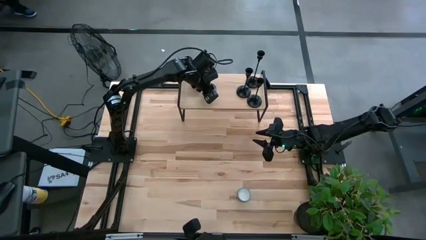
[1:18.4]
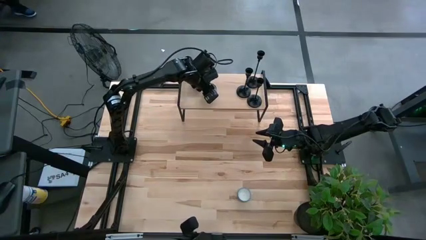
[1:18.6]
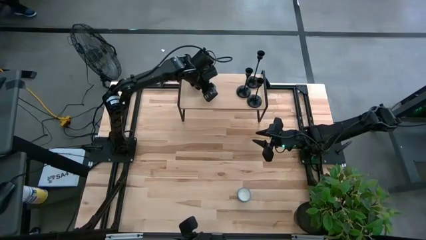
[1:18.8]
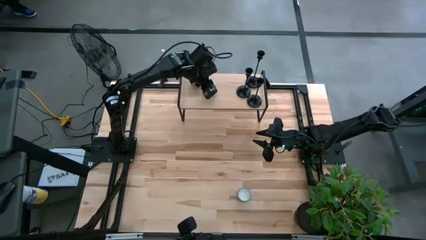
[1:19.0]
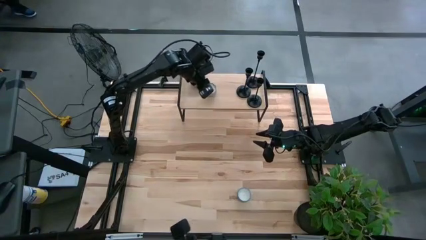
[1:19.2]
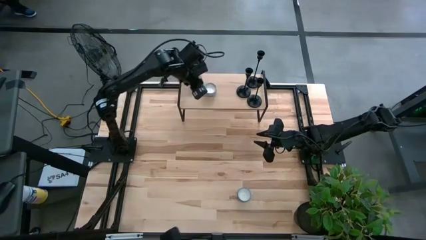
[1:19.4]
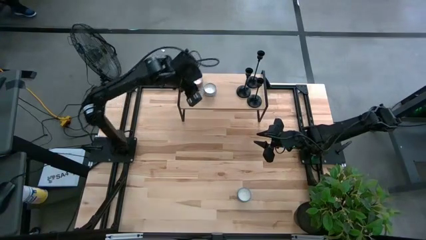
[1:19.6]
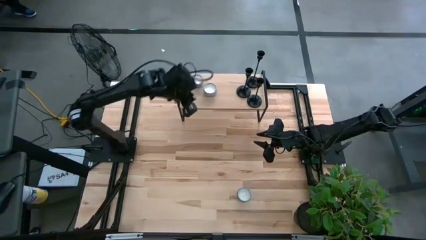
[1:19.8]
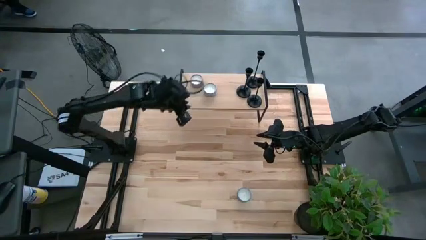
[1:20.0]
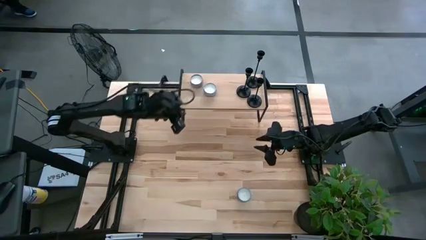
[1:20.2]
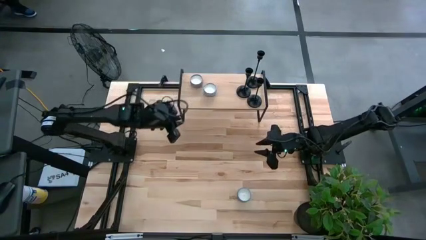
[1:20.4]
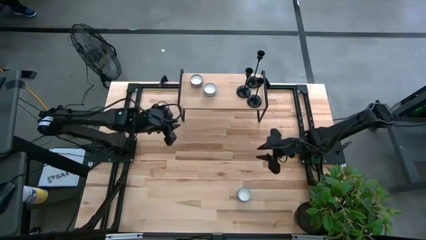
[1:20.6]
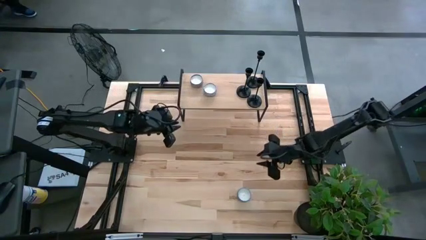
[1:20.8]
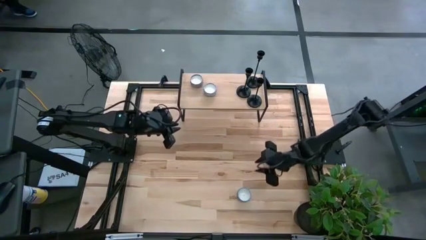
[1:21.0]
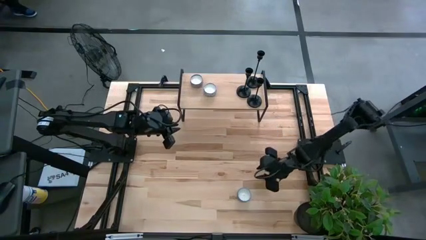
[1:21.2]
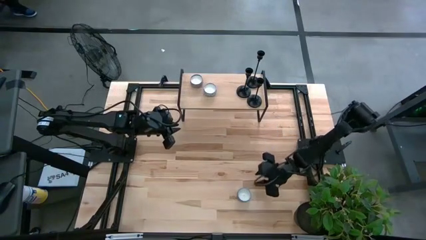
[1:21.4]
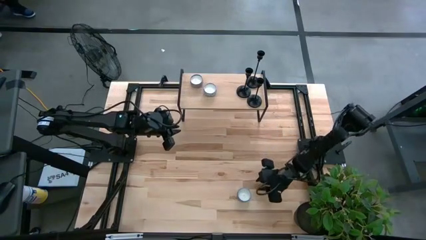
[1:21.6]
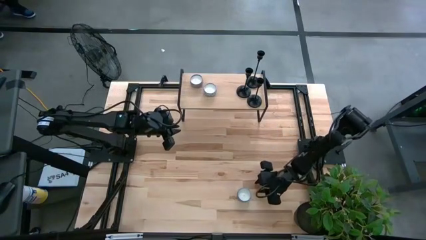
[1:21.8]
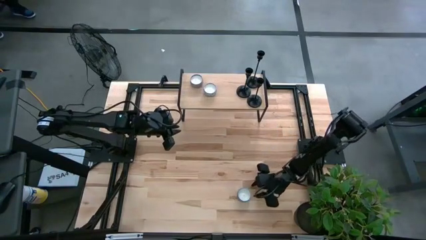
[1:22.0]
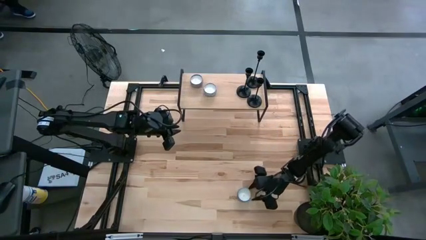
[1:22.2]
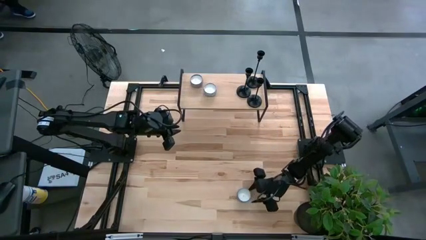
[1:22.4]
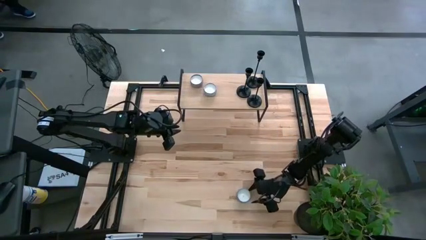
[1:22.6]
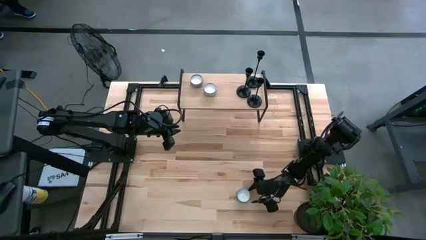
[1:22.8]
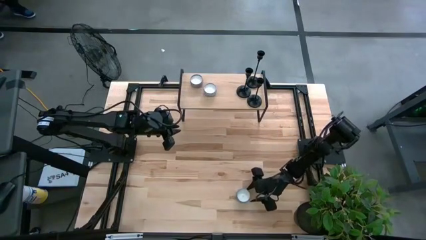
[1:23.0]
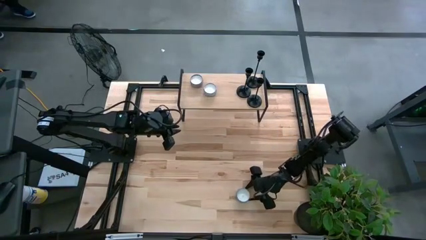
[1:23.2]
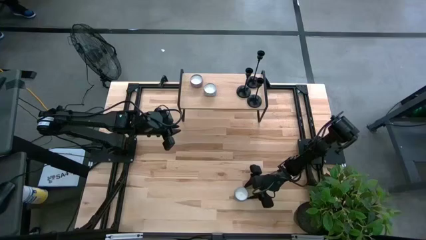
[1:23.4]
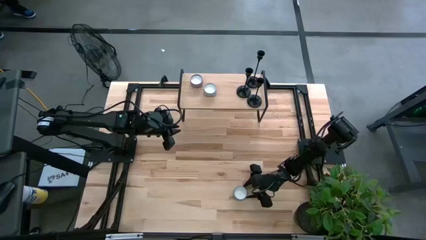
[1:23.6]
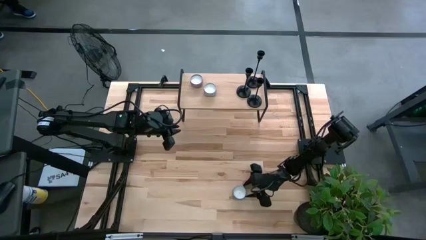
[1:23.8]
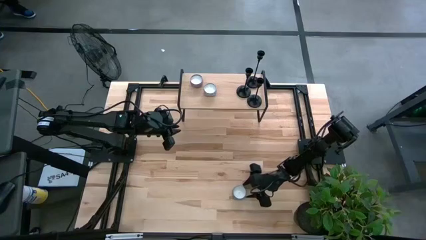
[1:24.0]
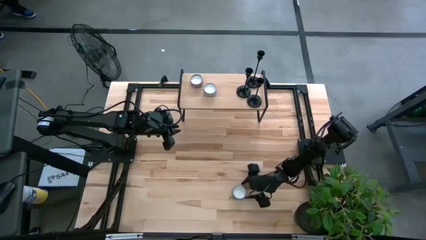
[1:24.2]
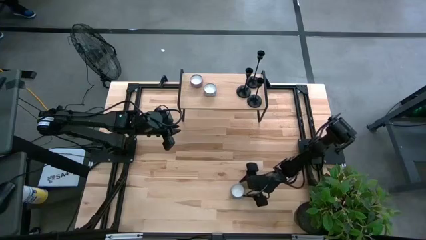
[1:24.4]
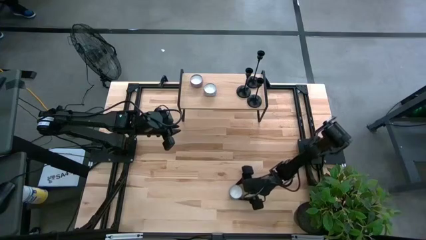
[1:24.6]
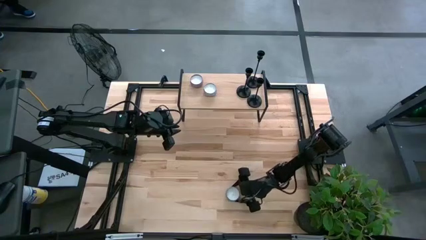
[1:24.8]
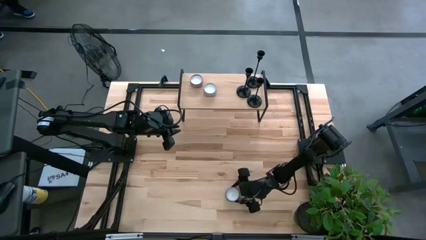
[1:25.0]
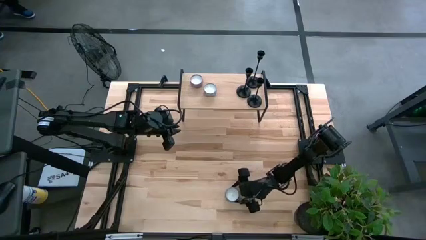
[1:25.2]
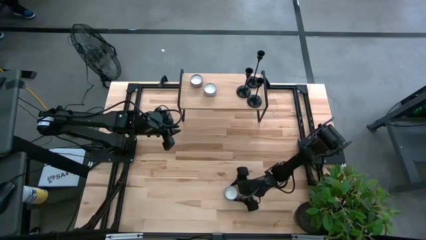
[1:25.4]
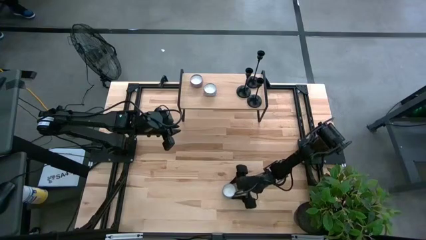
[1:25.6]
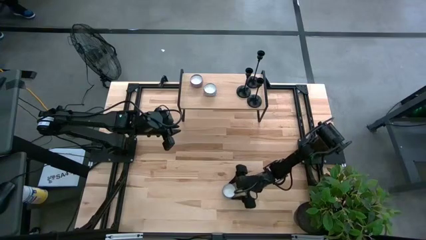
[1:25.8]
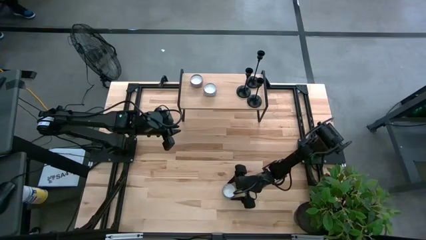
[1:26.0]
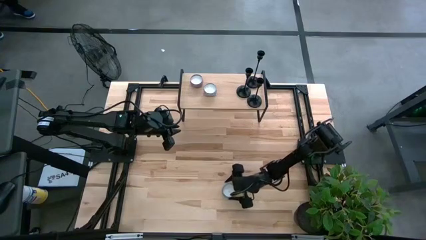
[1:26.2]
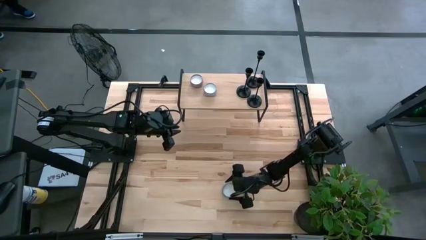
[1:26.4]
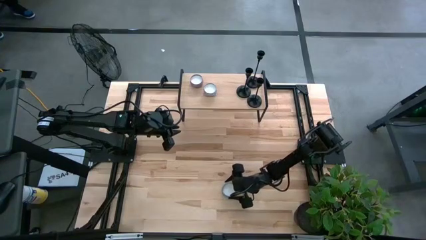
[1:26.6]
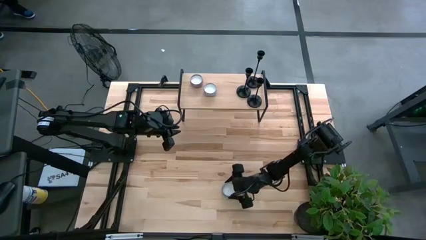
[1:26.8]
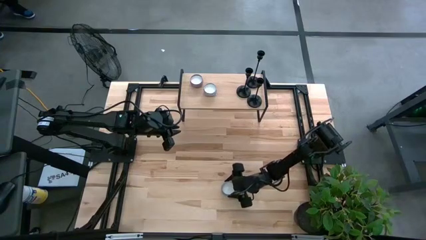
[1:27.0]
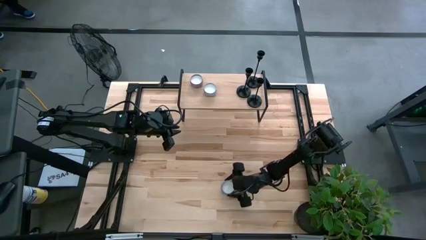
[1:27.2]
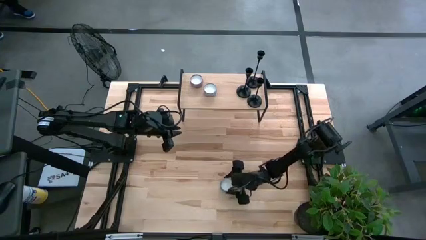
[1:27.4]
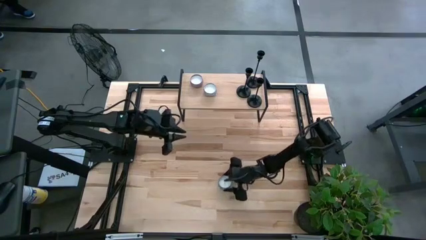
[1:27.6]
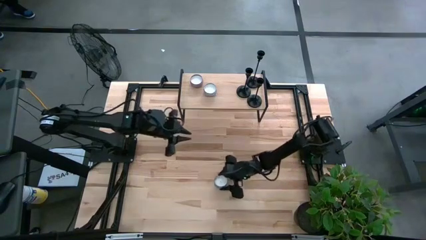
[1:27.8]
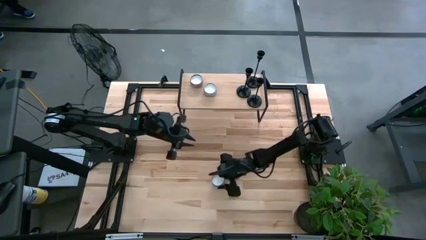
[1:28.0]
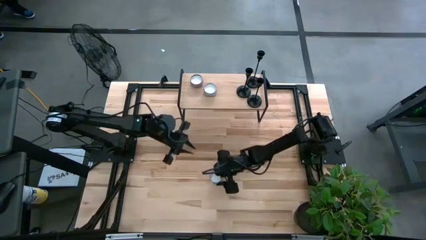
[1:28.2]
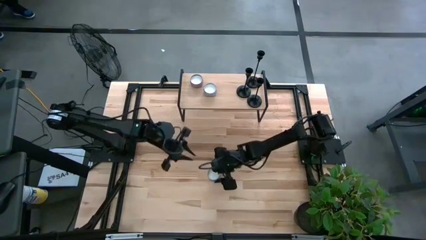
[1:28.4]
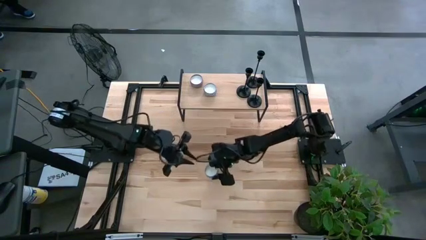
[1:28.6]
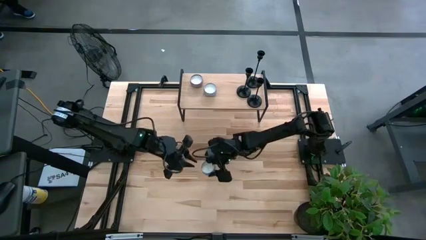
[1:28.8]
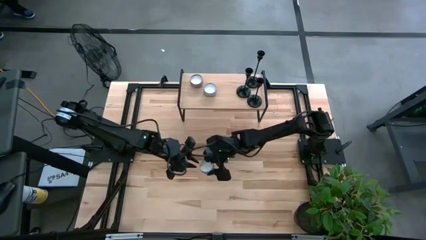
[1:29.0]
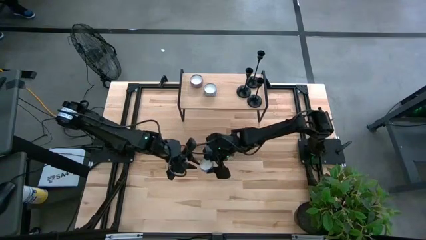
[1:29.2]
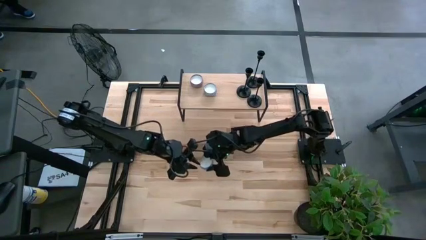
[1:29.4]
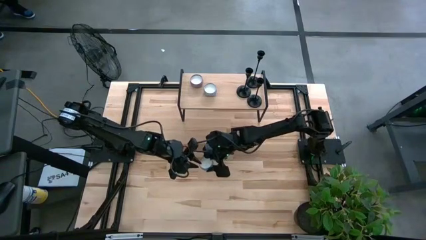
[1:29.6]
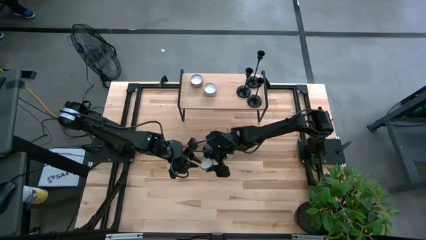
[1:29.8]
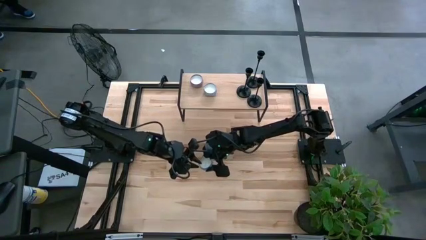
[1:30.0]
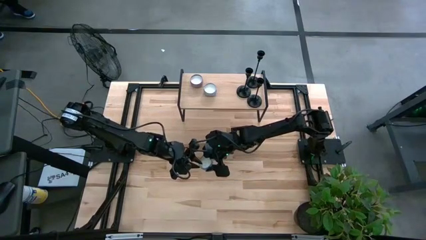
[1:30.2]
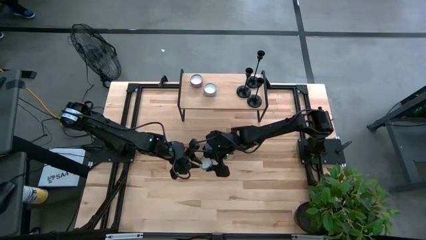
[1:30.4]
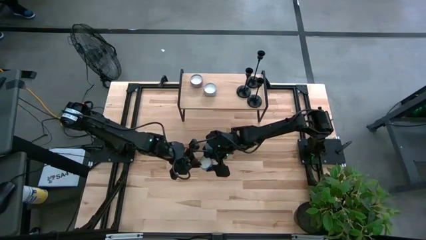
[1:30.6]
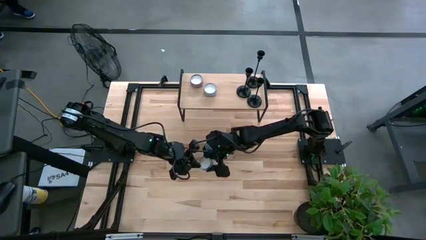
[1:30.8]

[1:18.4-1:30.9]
Task: Pick & Place candle stick holders
Put the blue scented candle on the shelf

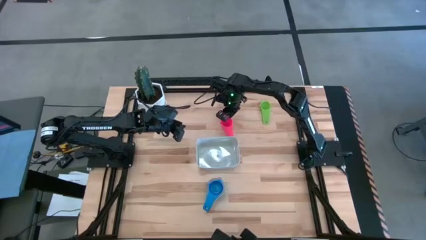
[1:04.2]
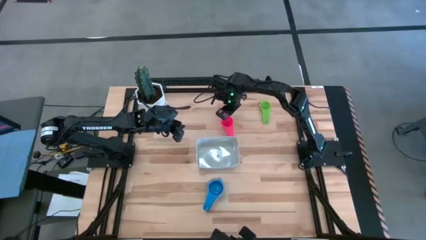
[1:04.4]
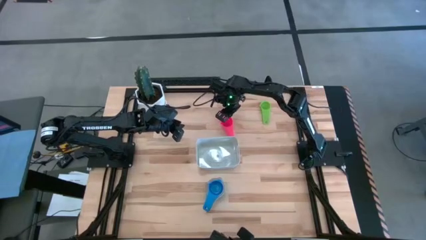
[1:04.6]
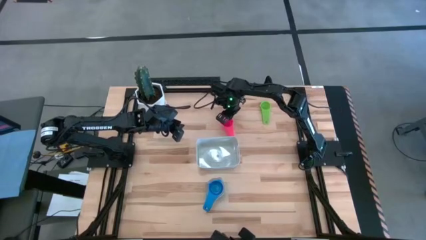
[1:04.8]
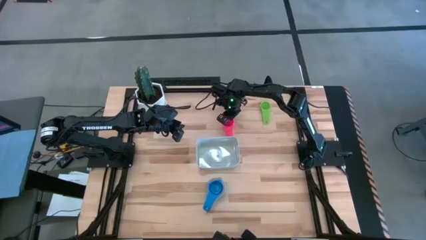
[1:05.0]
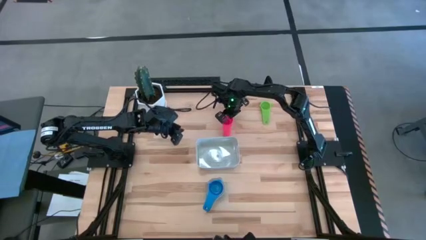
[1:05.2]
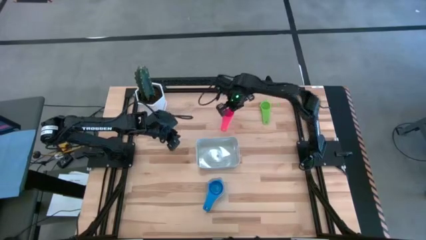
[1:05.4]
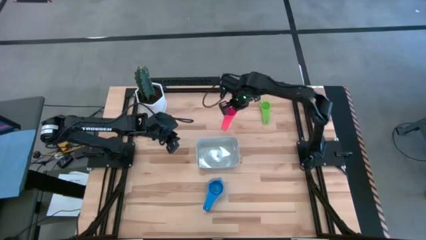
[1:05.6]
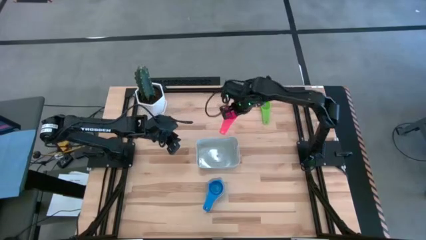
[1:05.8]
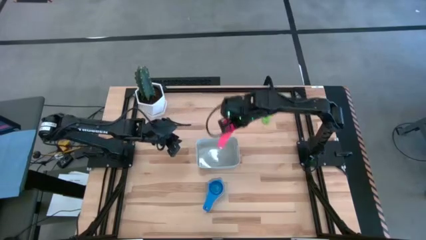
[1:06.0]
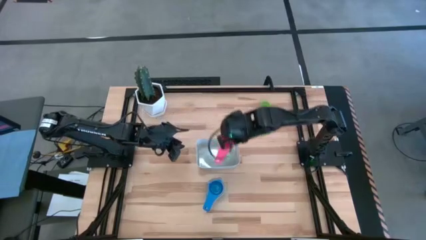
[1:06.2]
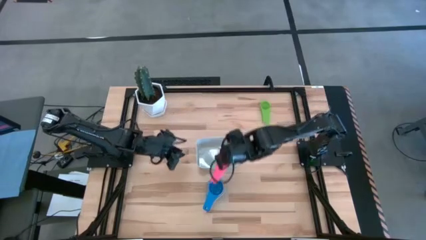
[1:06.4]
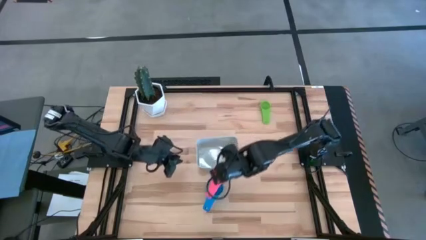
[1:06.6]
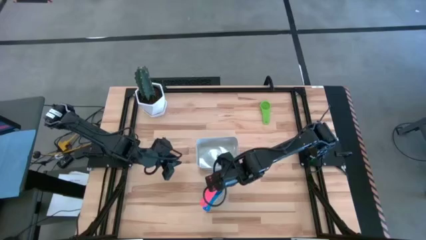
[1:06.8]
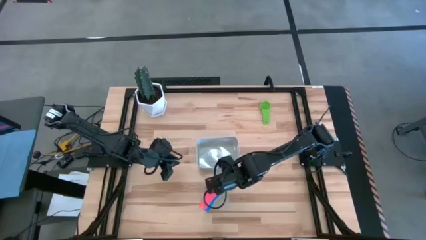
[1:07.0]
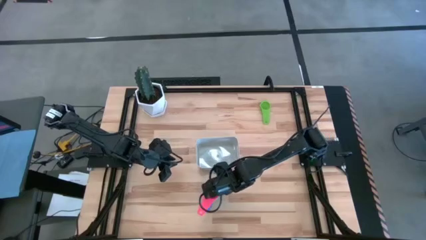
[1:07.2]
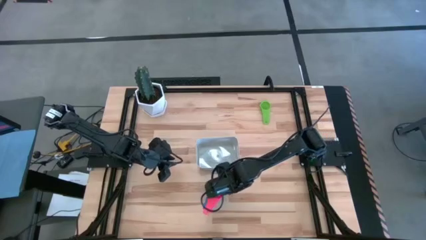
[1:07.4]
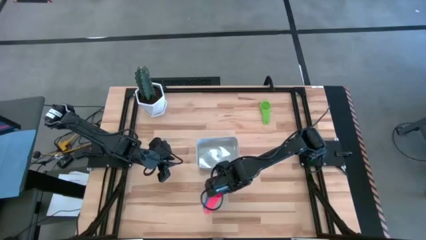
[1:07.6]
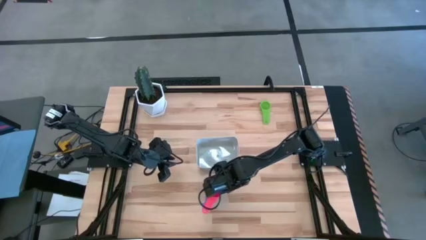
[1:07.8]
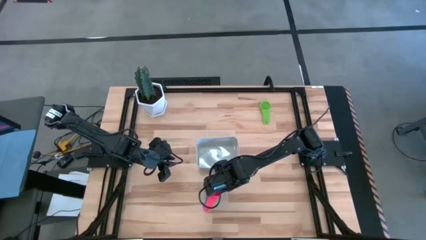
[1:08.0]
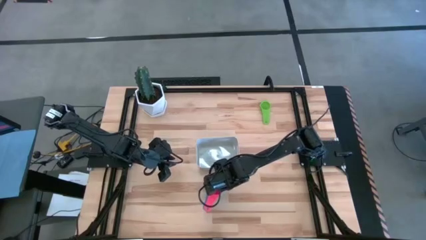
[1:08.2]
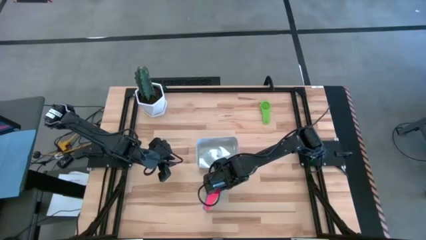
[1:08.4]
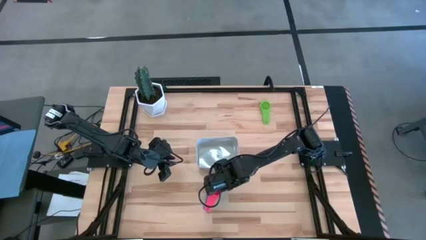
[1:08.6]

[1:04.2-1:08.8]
Task: Nest measuring cups in basket
Stack the red measuring cup on top of the blue measuring cup
